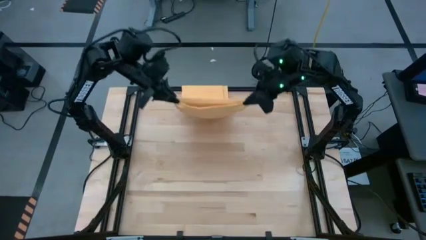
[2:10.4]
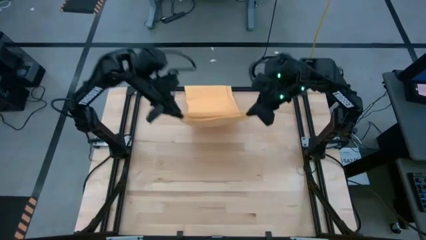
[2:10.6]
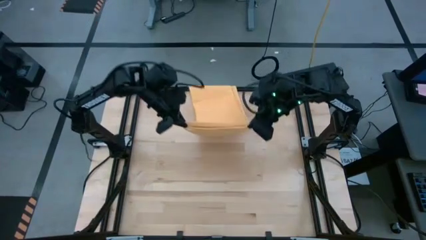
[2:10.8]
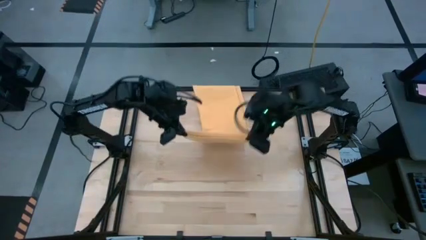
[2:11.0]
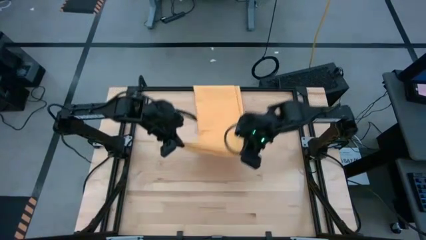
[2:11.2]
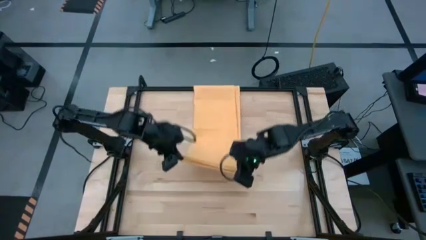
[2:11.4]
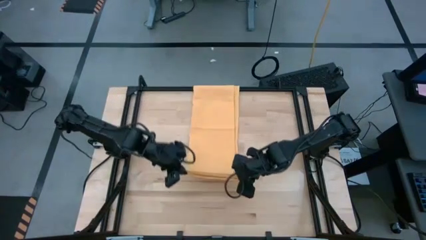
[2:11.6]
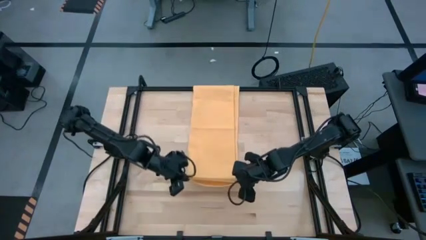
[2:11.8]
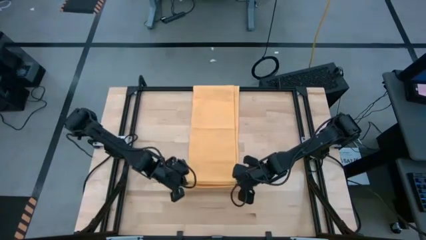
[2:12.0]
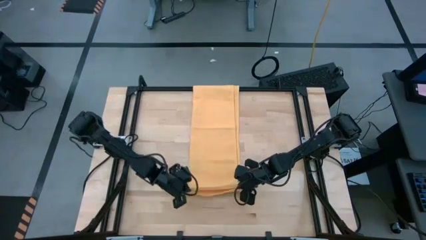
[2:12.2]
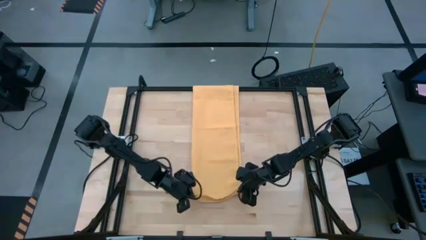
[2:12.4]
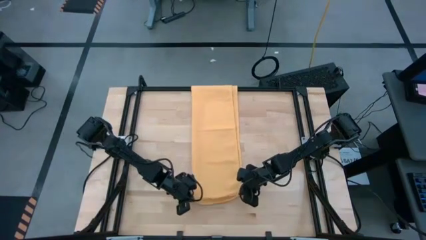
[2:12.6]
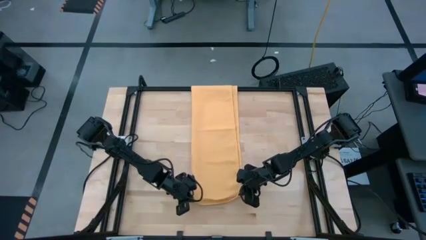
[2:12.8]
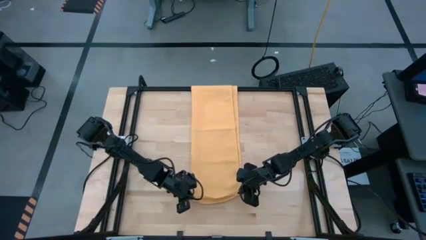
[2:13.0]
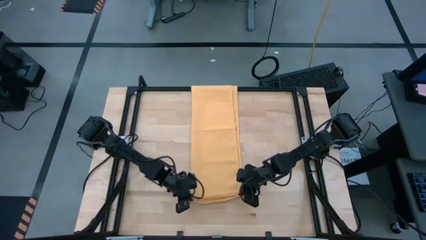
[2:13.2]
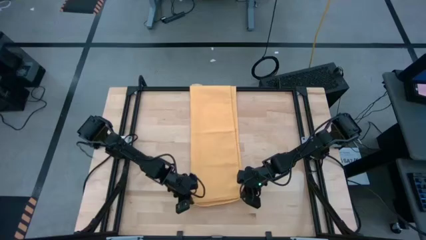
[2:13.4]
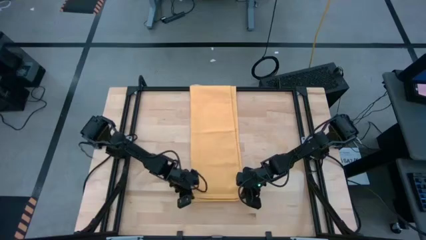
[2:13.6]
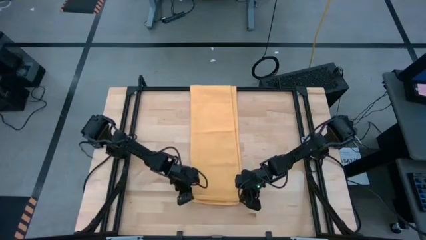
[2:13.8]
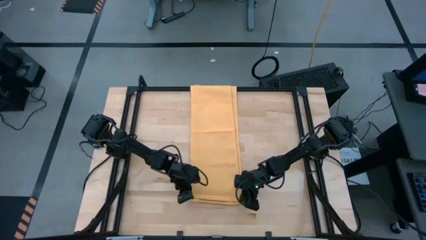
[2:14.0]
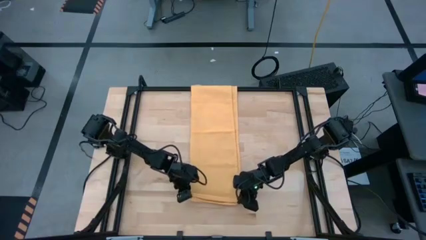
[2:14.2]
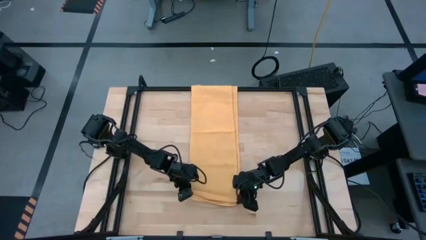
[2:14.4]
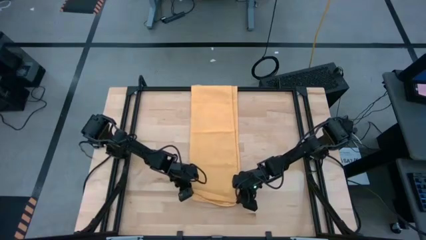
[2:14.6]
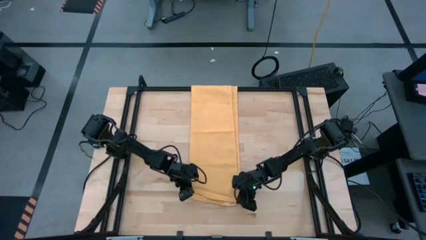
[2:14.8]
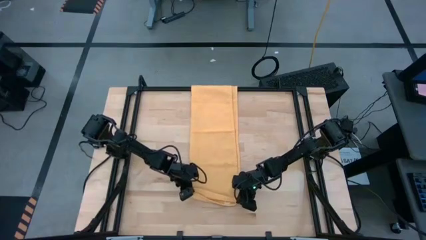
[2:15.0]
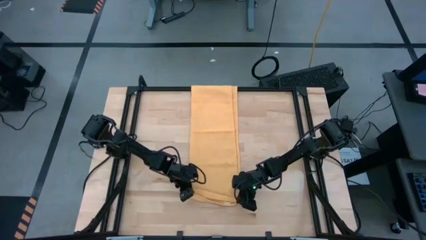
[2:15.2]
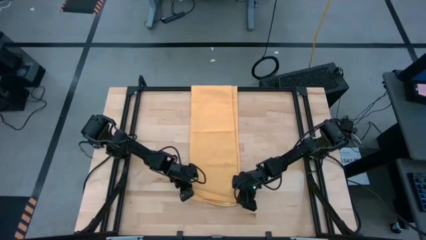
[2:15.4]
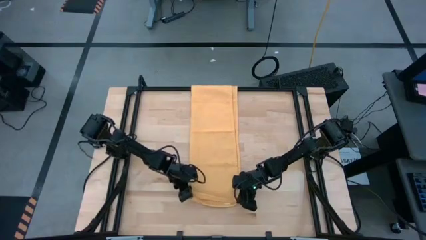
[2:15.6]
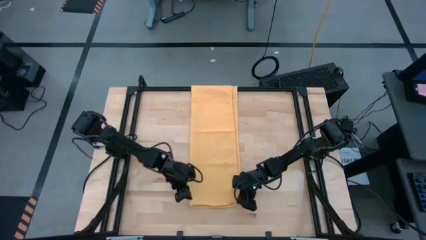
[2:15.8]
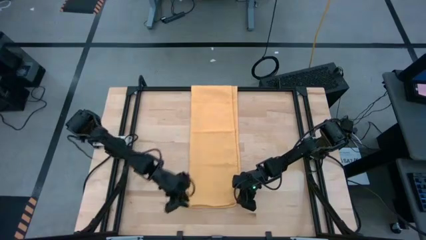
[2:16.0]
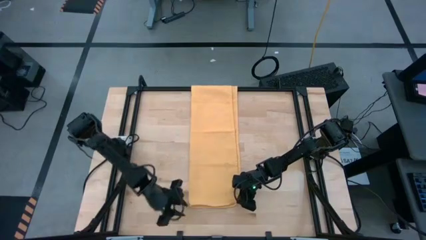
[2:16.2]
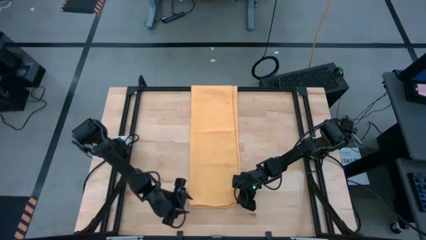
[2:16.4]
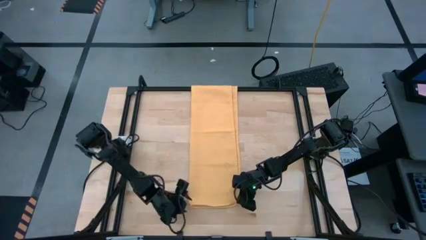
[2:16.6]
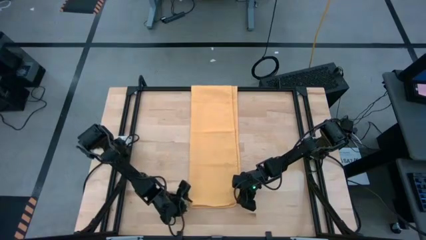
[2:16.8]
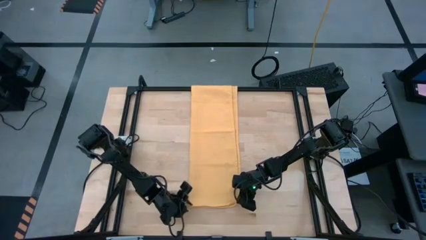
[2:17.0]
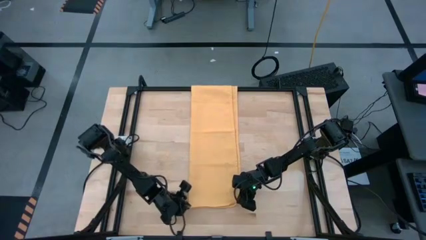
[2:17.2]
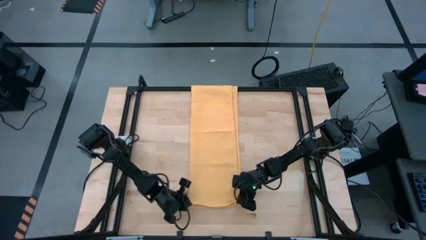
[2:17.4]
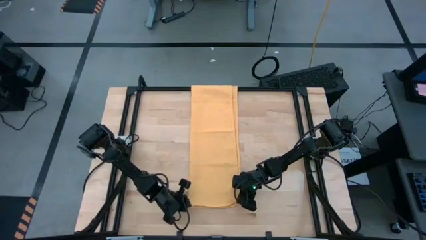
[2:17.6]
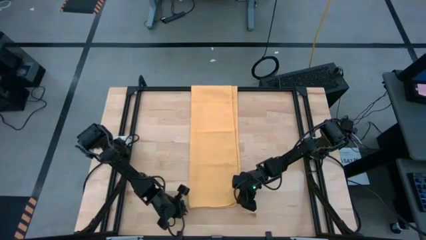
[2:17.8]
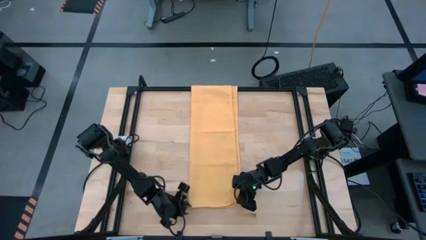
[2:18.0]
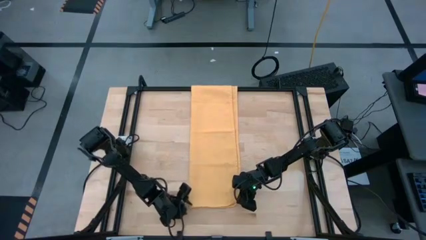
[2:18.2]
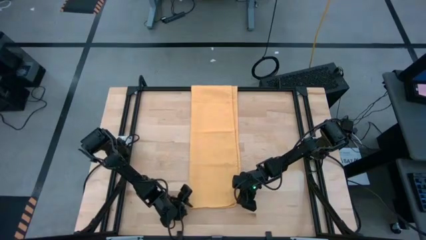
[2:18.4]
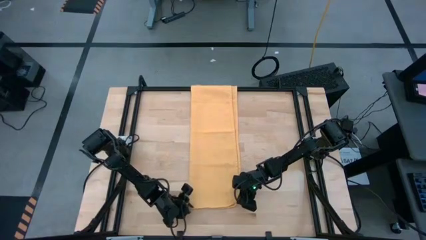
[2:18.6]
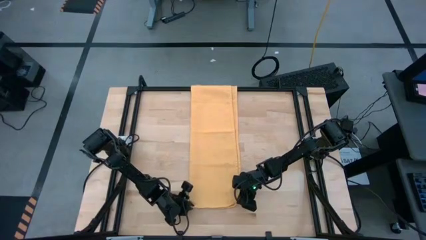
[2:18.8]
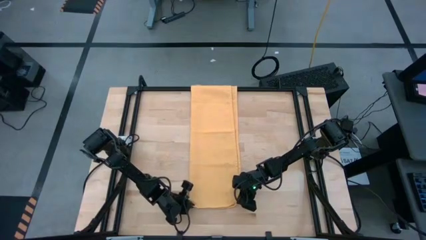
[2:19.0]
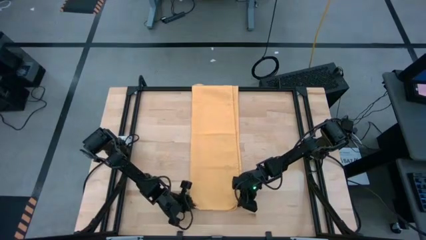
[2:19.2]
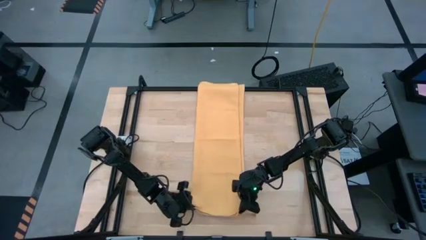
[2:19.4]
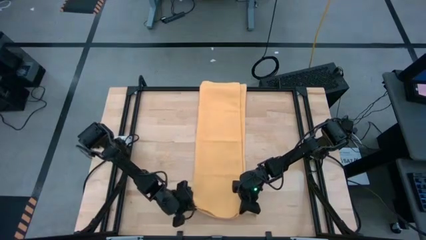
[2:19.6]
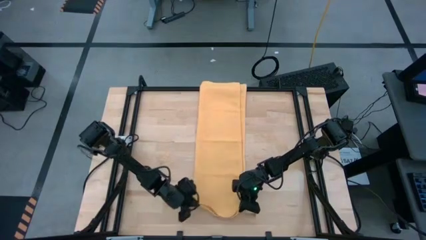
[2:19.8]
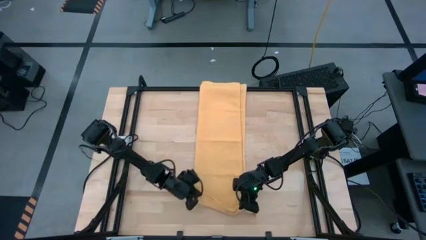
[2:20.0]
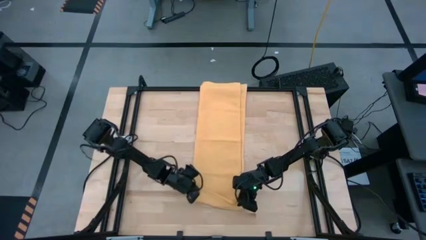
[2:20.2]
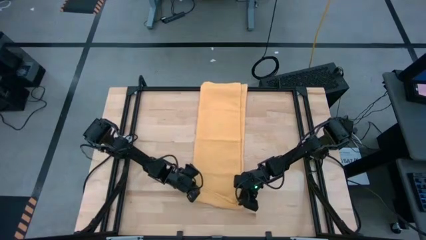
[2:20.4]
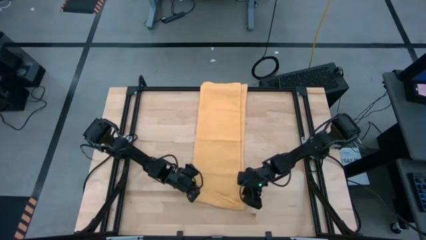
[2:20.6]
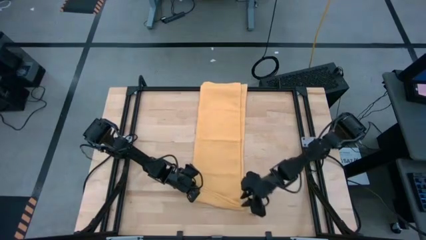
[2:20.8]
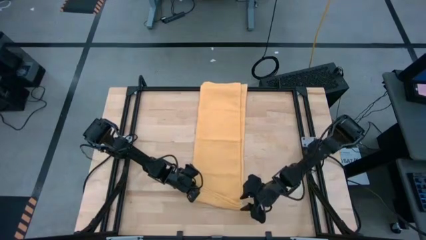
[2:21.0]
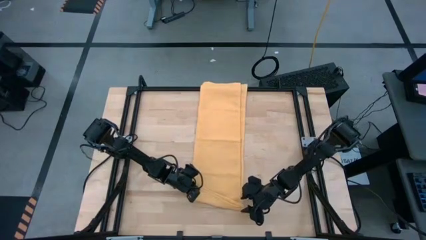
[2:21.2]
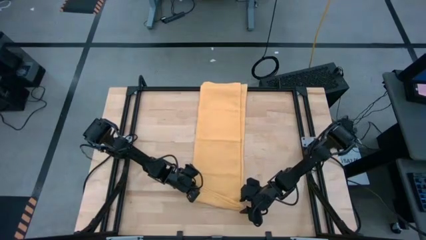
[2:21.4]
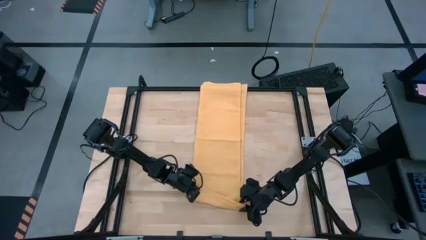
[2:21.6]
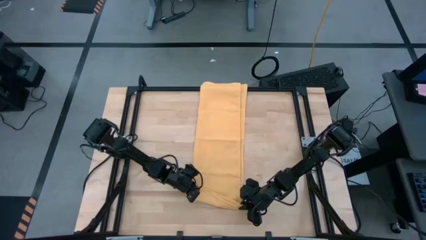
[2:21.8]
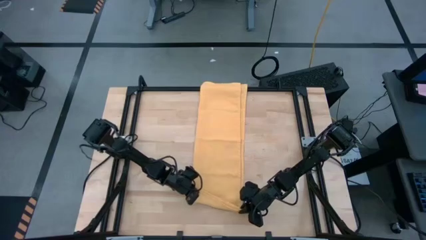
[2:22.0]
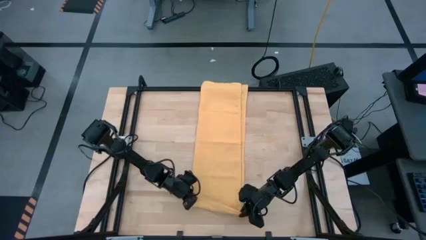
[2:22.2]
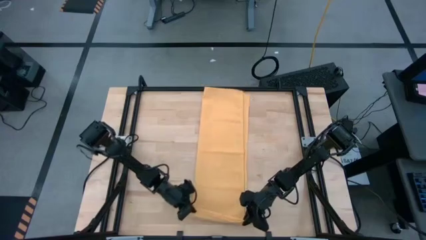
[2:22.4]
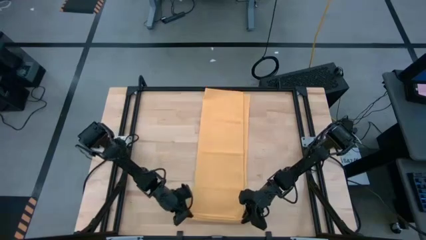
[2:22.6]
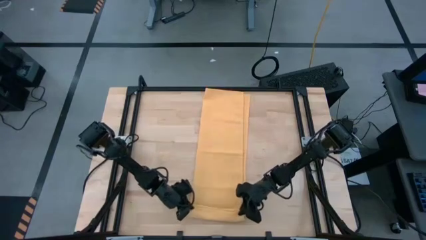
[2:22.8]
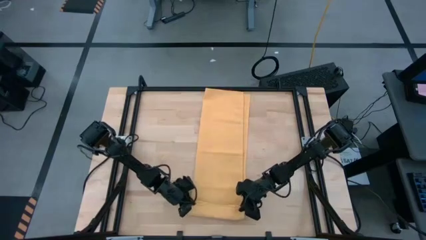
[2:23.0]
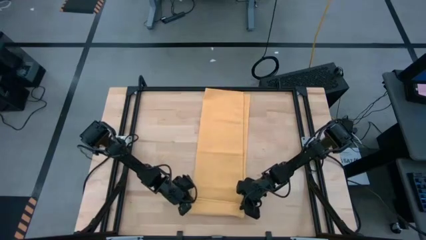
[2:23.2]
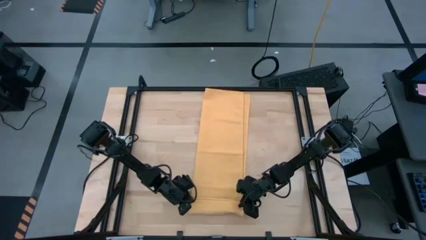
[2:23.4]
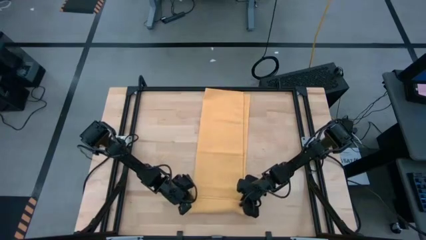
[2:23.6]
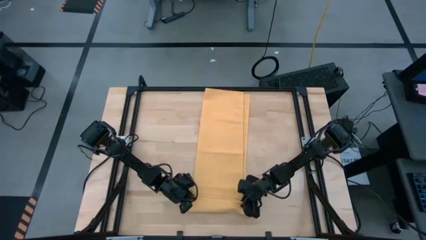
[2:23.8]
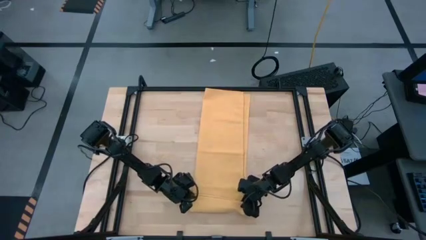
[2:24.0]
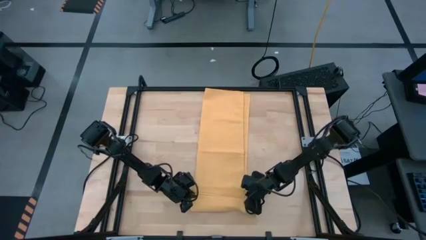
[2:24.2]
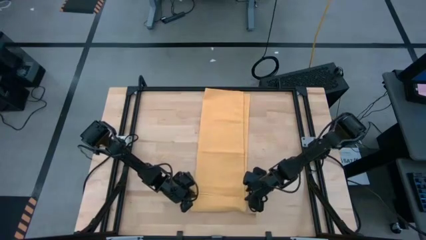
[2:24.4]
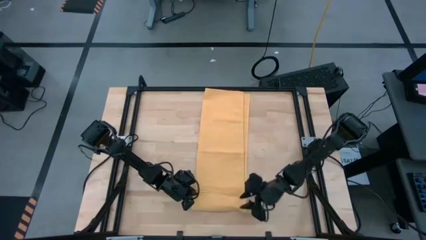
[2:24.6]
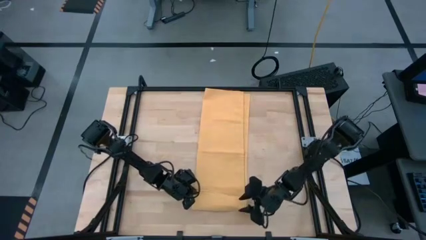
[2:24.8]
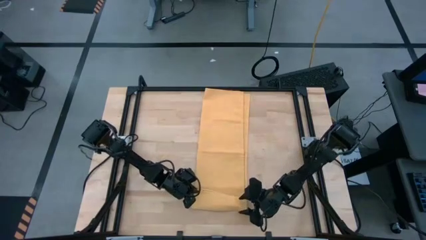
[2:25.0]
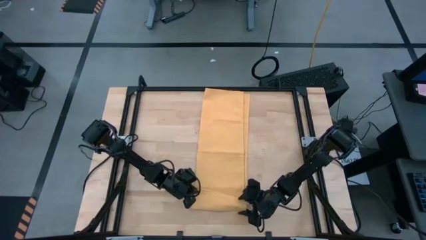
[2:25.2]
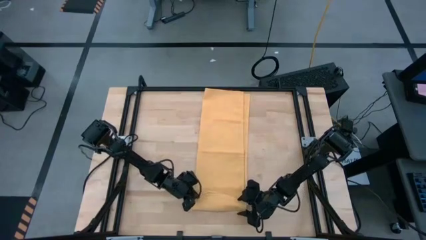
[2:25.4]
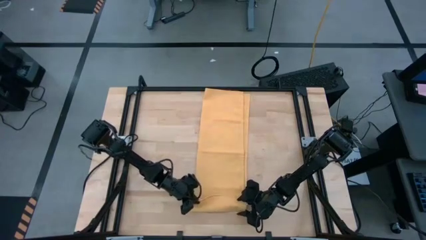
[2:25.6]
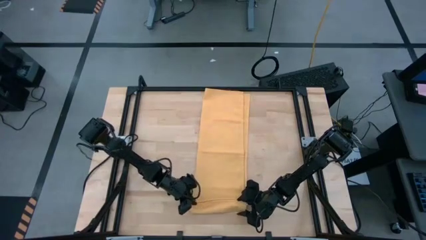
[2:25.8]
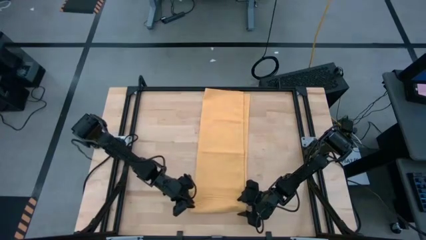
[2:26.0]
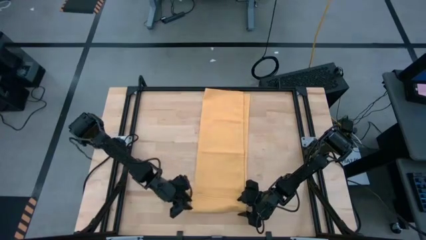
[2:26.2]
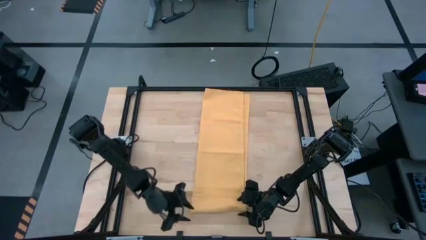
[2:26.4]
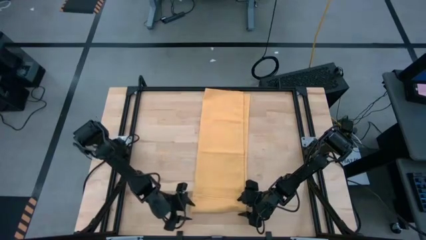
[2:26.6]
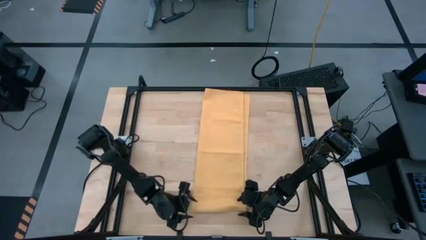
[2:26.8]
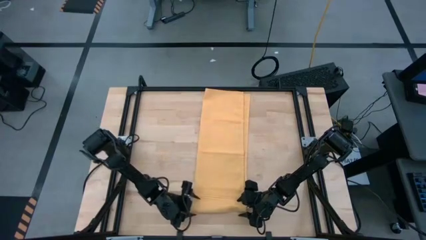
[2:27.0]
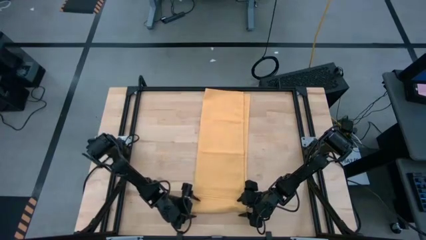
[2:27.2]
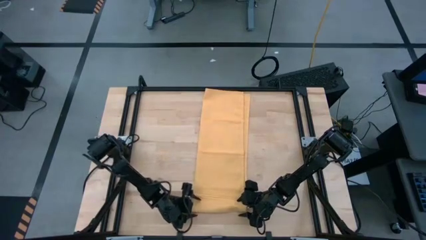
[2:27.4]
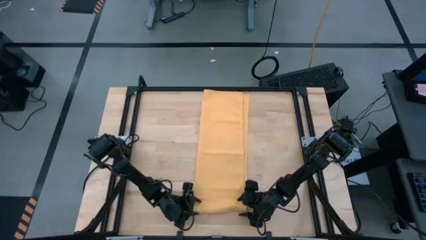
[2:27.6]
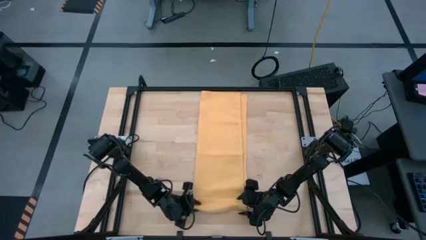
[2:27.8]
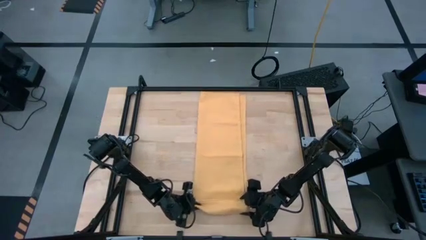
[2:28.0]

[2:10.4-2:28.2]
Task: Roll towel
Roll the yellow towel
